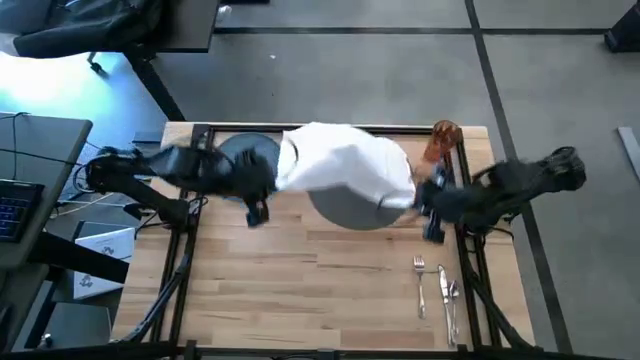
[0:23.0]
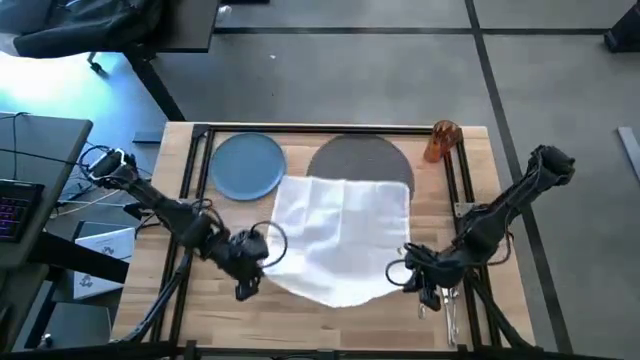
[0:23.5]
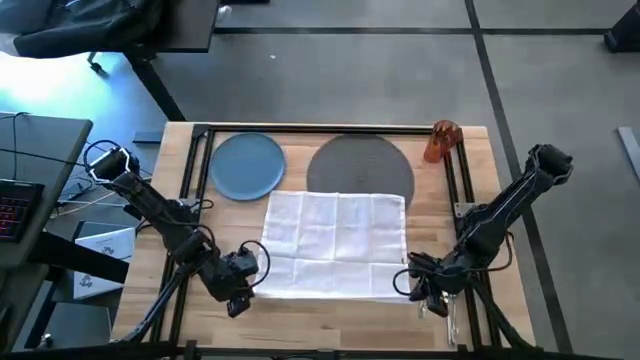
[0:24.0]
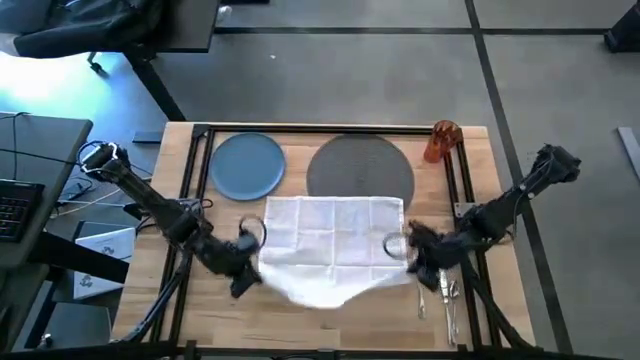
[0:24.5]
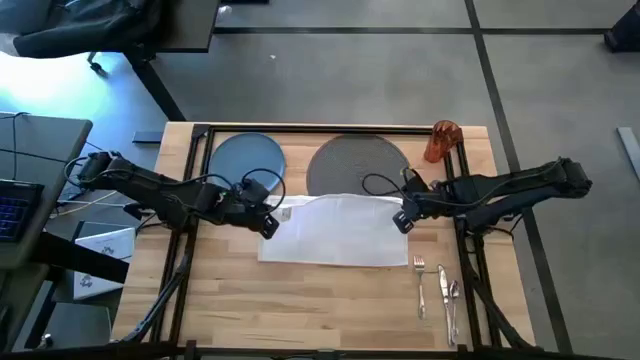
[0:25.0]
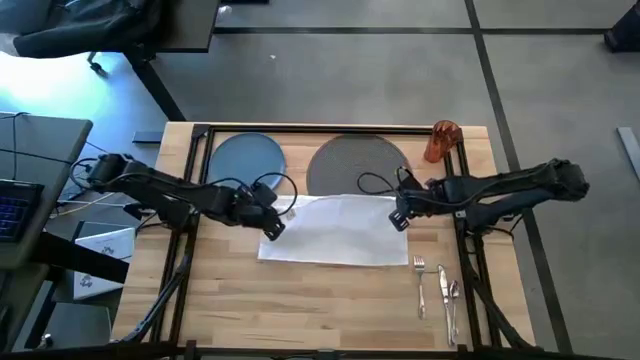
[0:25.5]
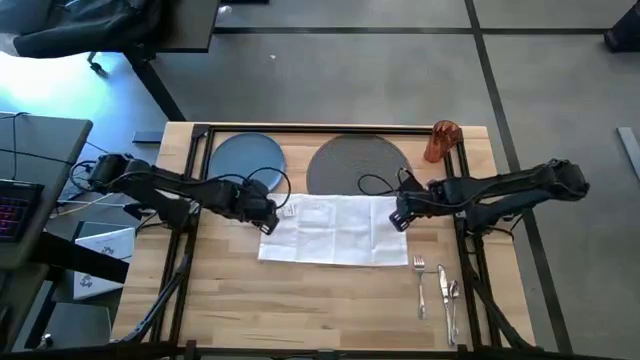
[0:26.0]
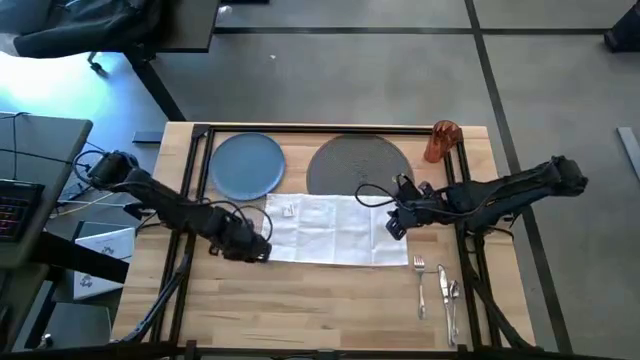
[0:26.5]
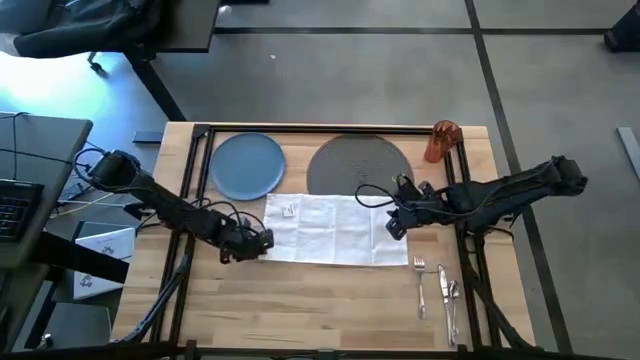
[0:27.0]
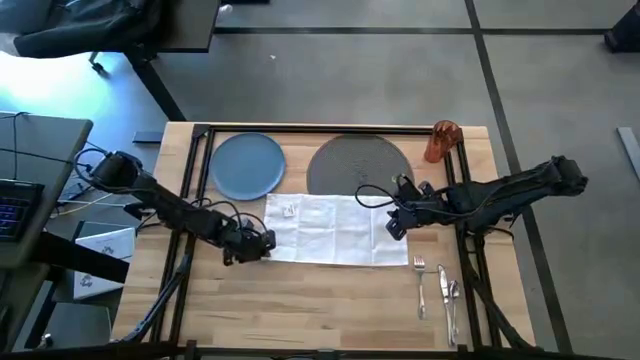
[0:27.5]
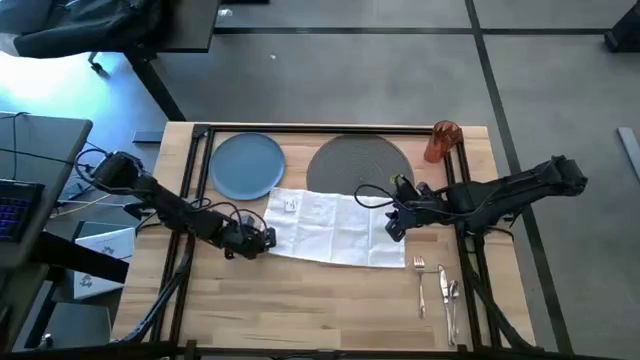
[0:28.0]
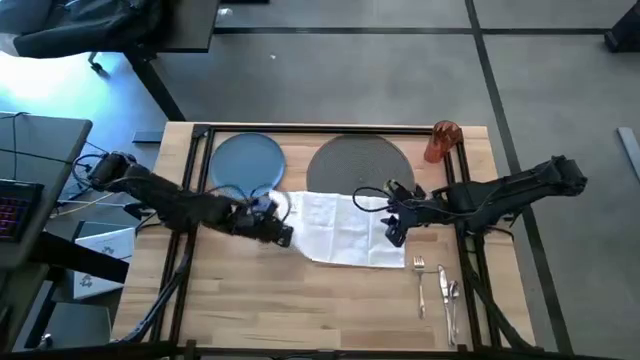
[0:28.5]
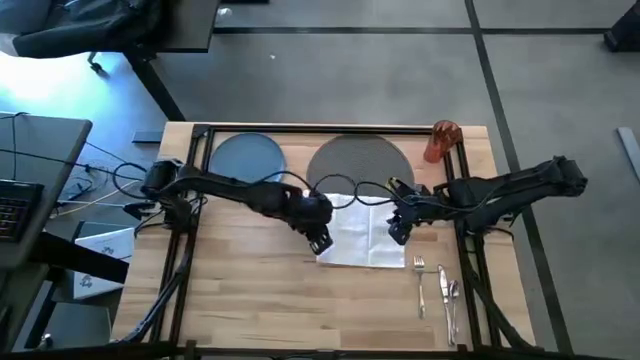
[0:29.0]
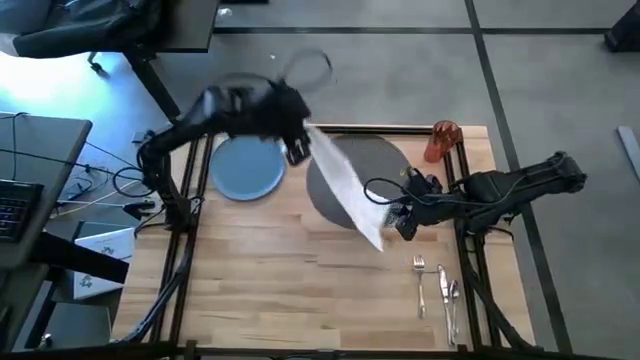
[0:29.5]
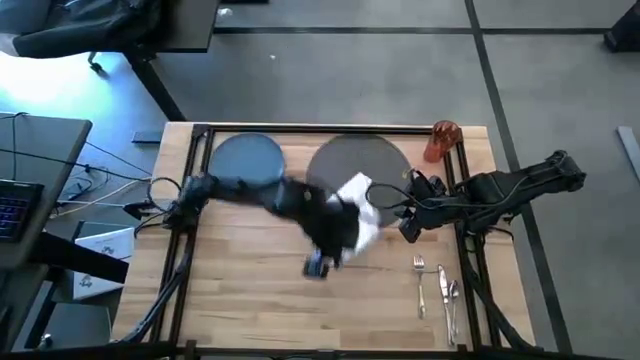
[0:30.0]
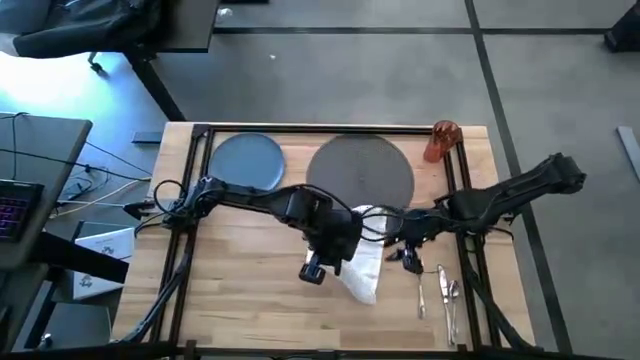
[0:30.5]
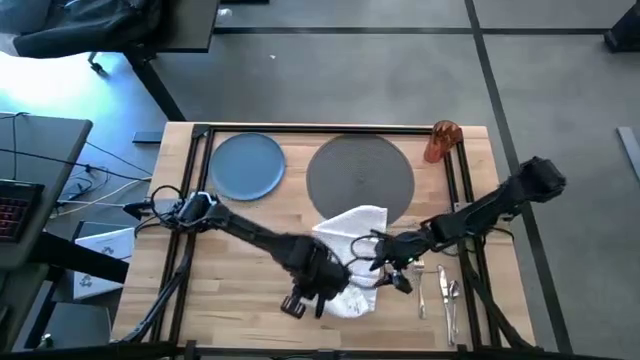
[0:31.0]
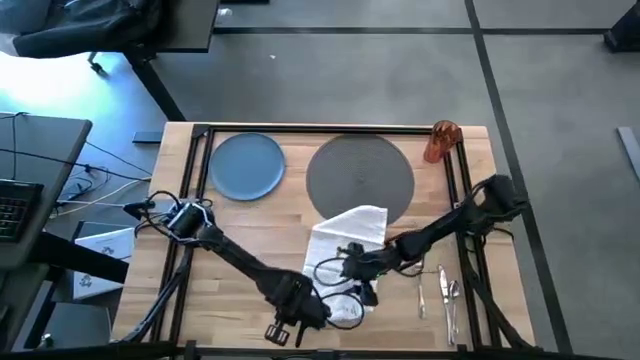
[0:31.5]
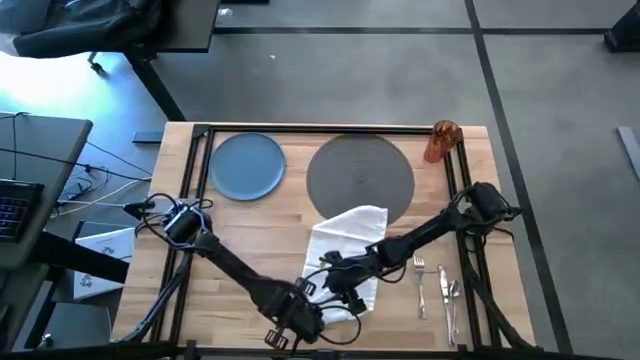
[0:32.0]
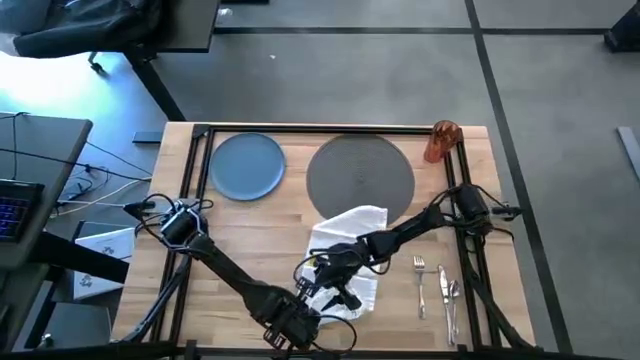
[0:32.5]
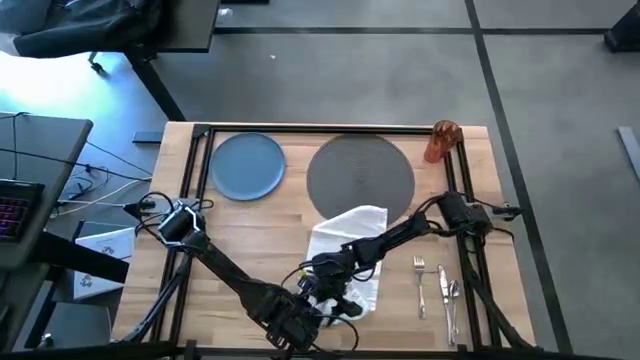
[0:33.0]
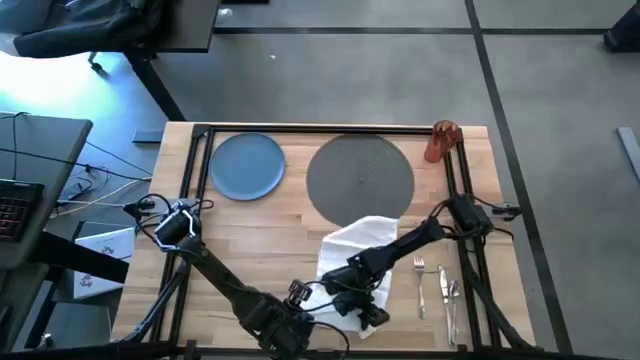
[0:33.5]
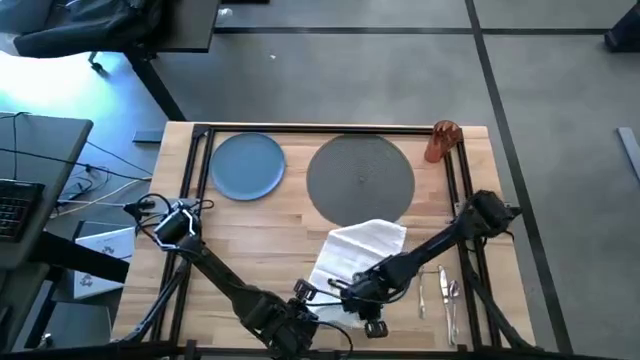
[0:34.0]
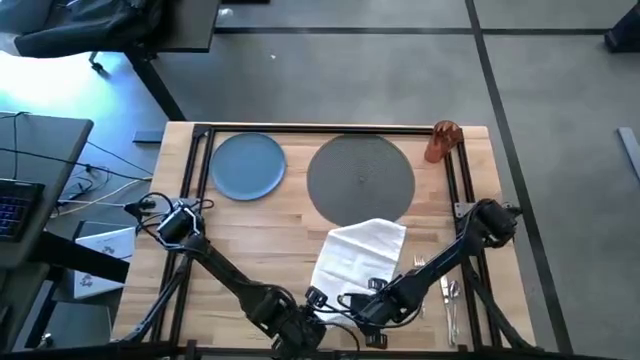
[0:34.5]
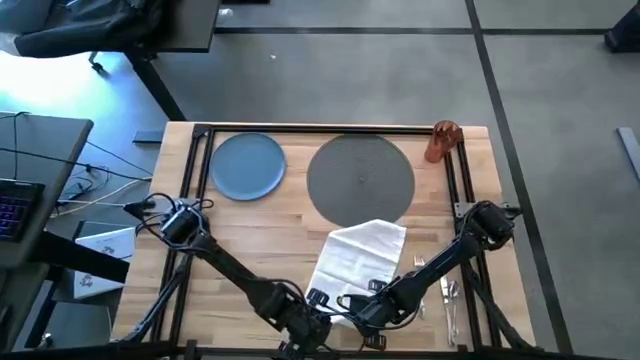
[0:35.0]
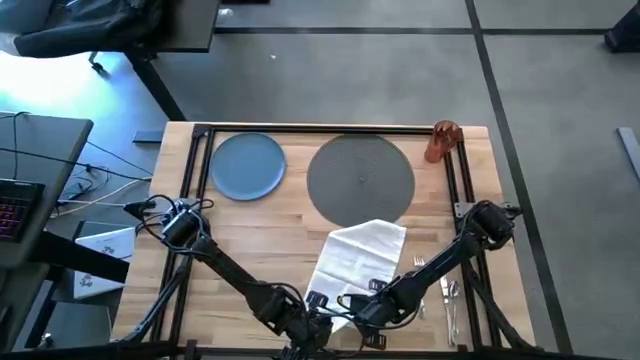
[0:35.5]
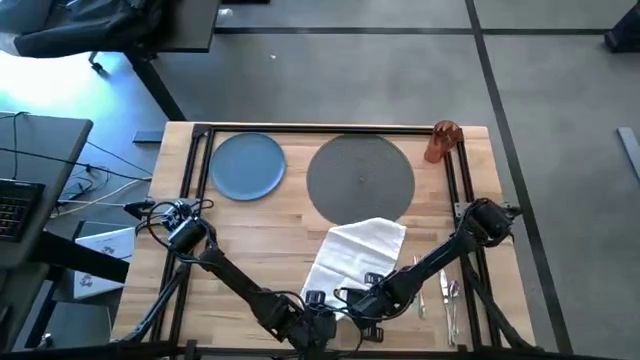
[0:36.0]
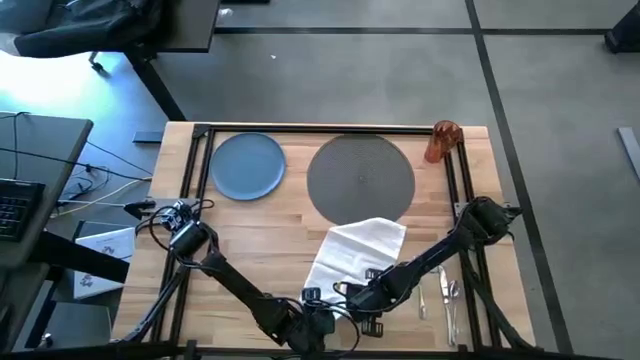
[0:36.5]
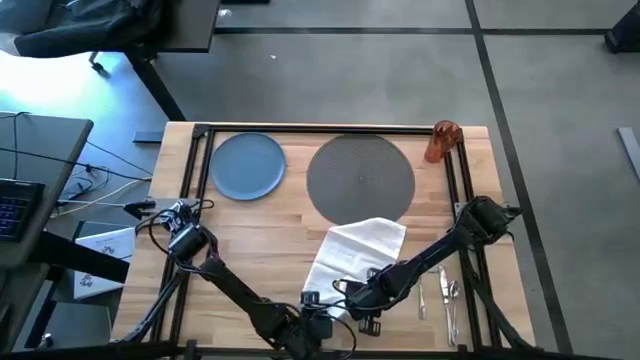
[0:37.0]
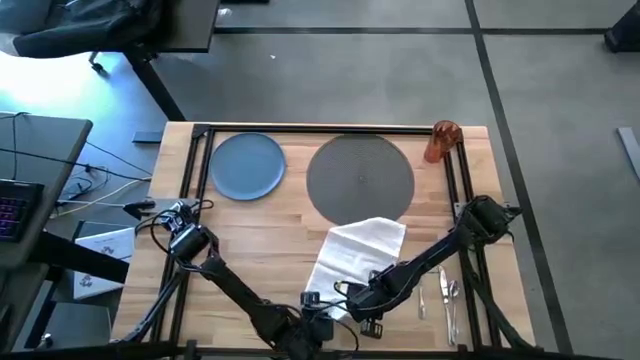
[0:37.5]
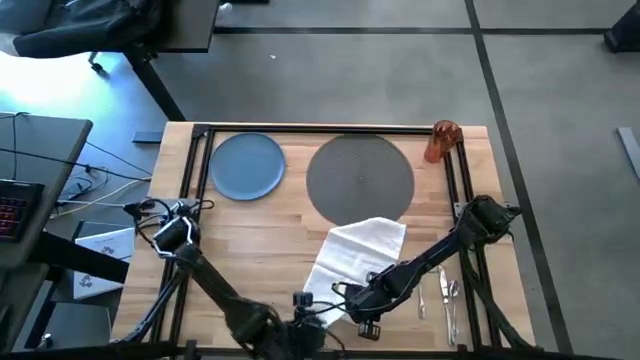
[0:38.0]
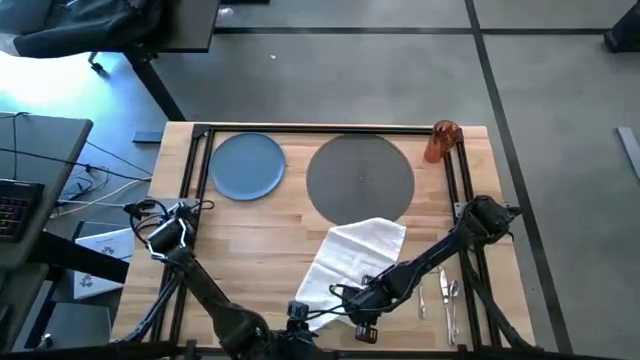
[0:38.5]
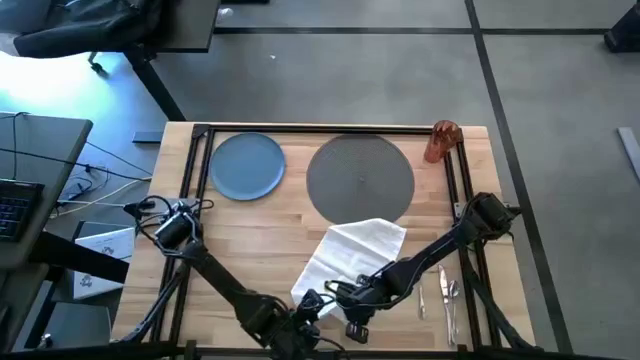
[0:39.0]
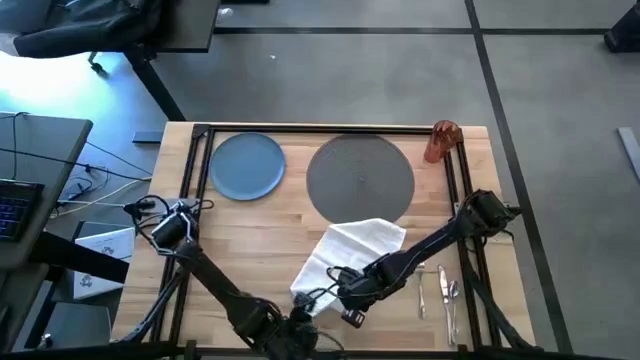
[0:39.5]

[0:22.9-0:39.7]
Task: Set table place
Fold the white table napkin

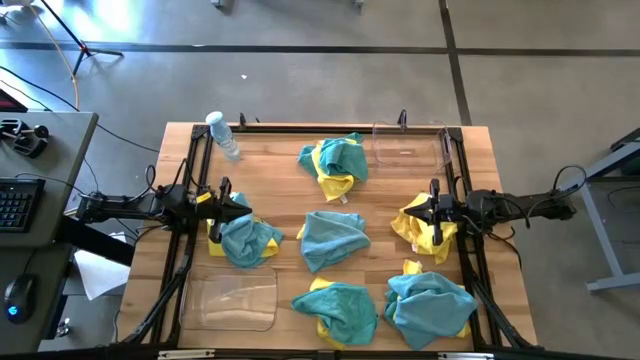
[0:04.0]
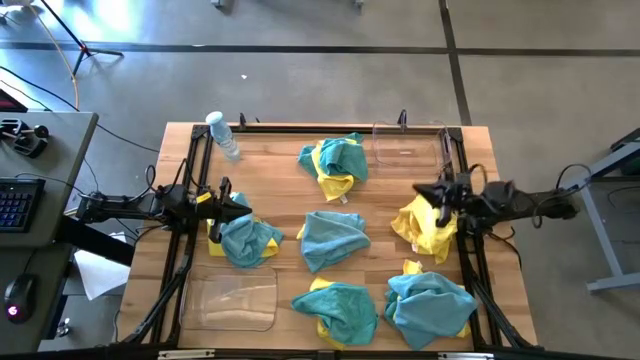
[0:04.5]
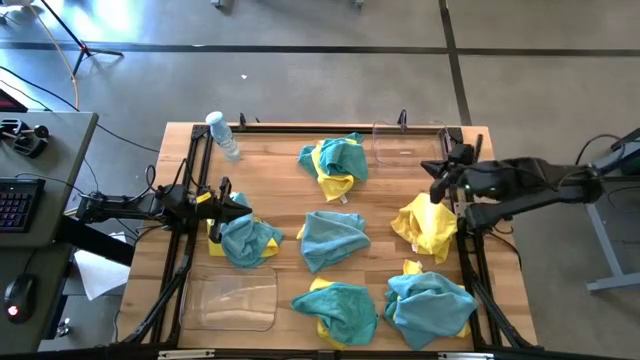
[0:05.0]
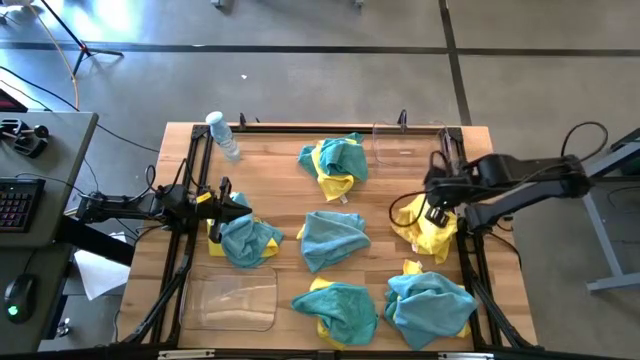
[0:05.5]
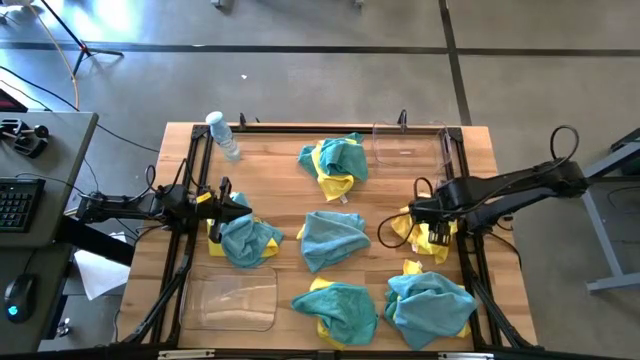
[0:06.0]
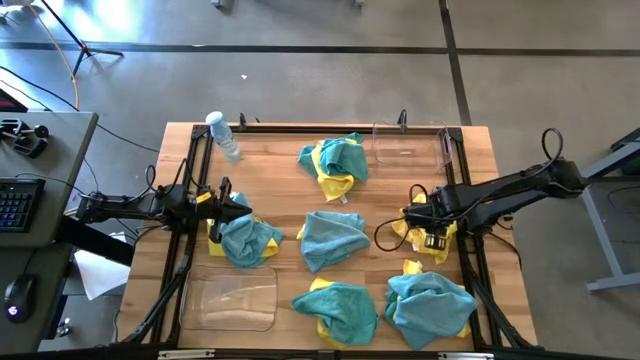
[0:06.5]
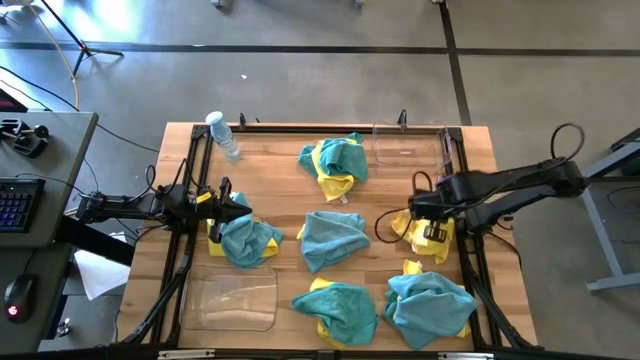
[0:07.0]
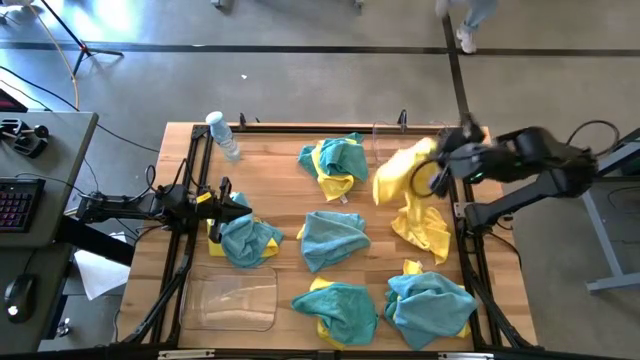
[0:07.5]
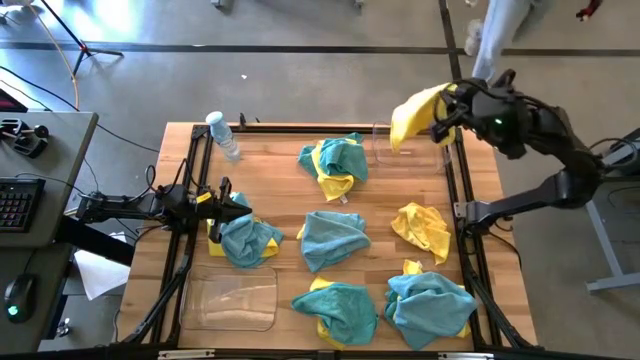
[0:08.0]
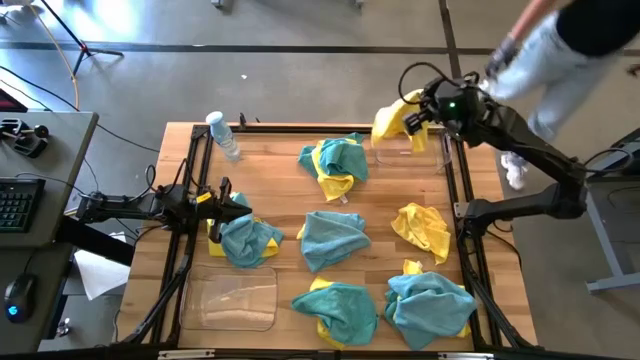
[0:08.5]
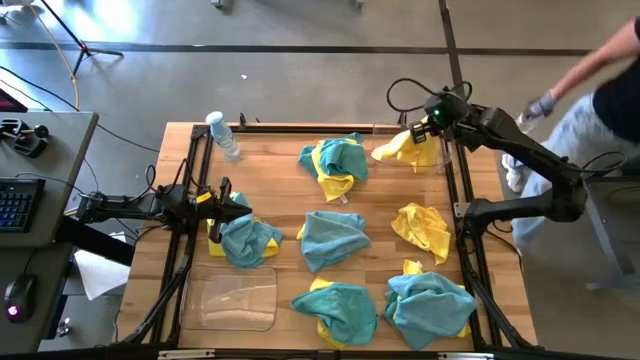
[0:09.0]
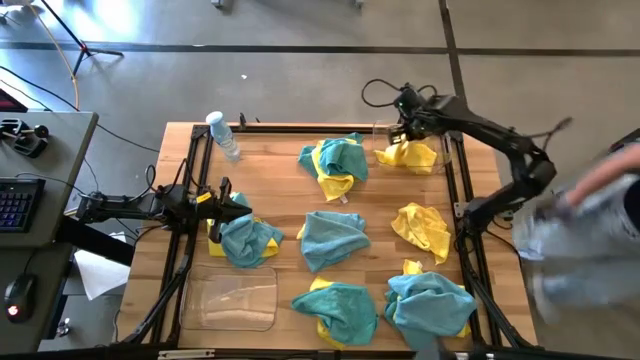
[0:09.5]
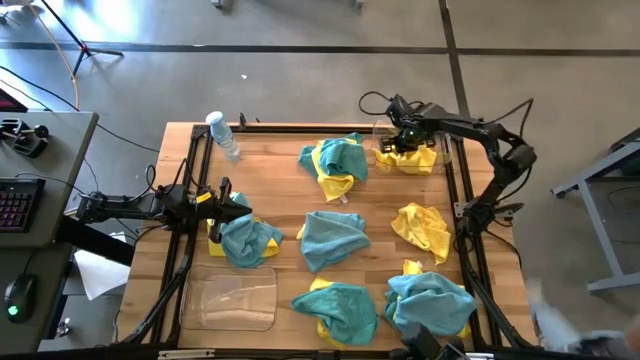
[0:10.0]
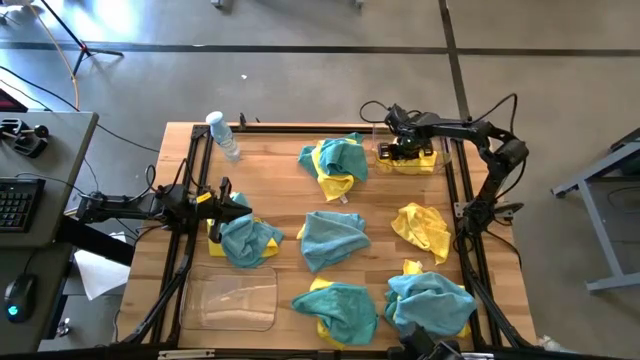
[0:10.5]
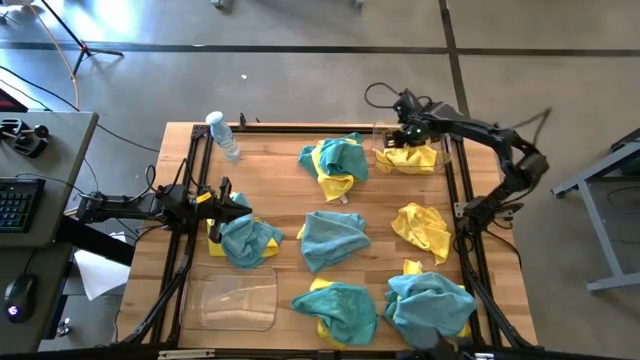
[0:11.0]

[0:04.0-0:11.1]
Task: Sort microfiber towel by color & place in baskets
Put the yellow microfiber towel into the top transparent bin
